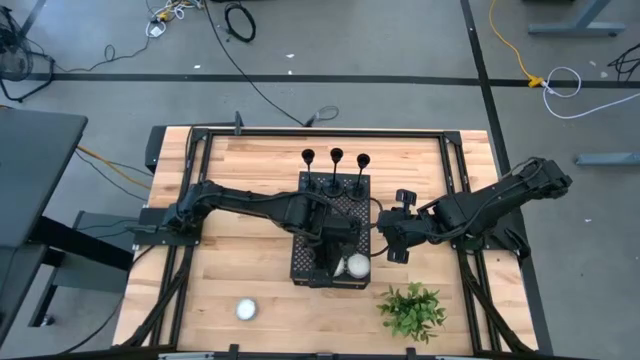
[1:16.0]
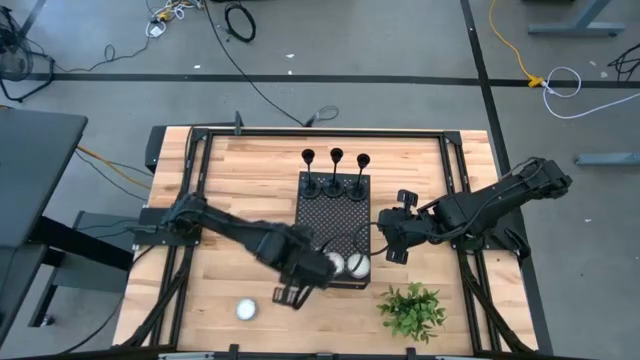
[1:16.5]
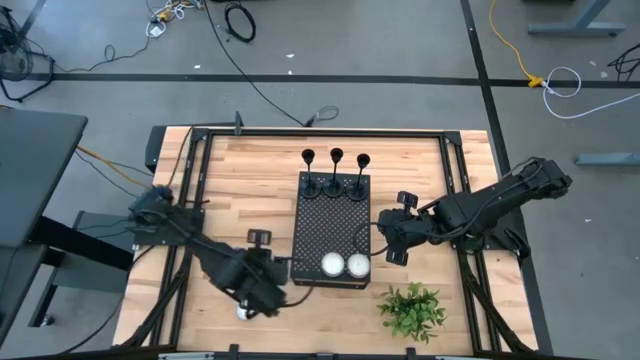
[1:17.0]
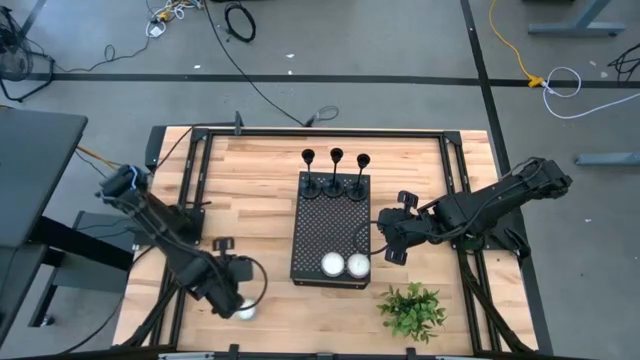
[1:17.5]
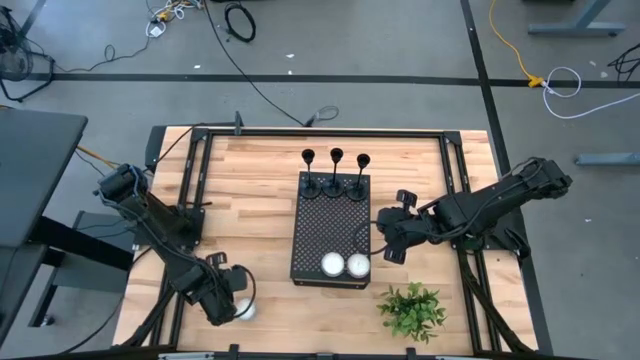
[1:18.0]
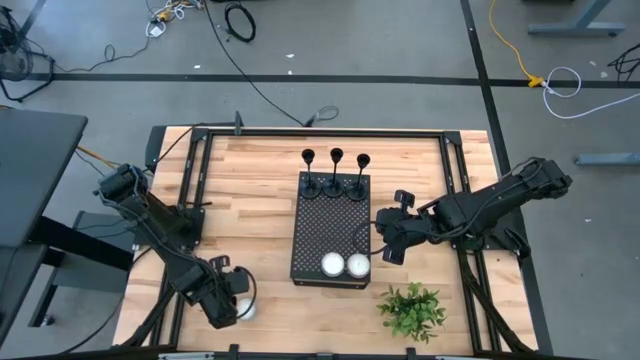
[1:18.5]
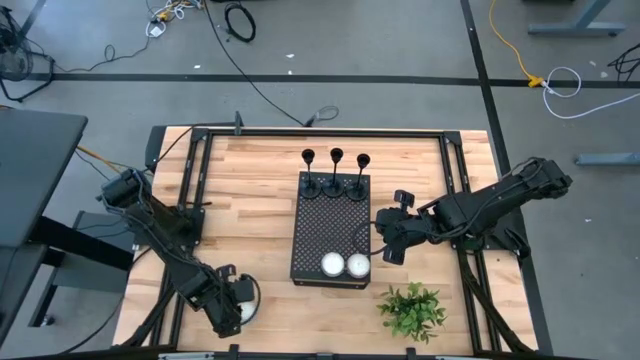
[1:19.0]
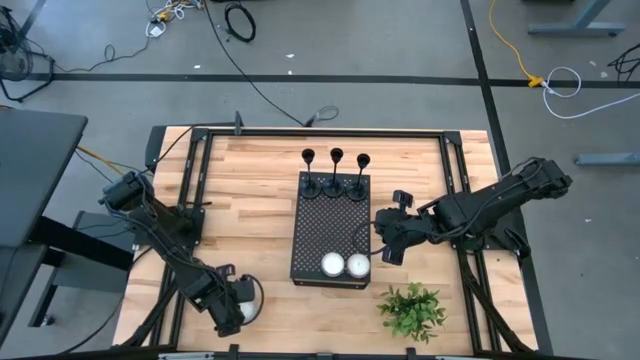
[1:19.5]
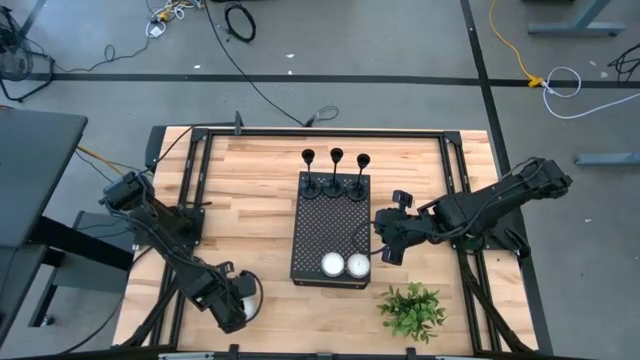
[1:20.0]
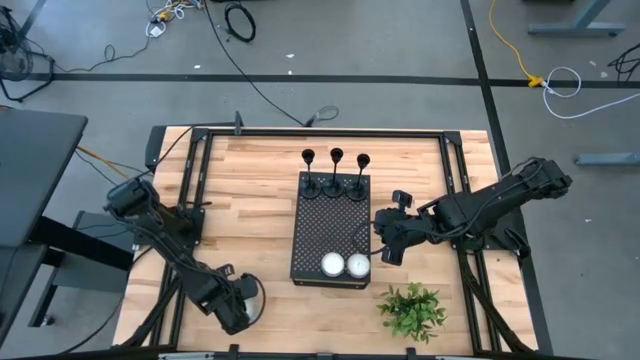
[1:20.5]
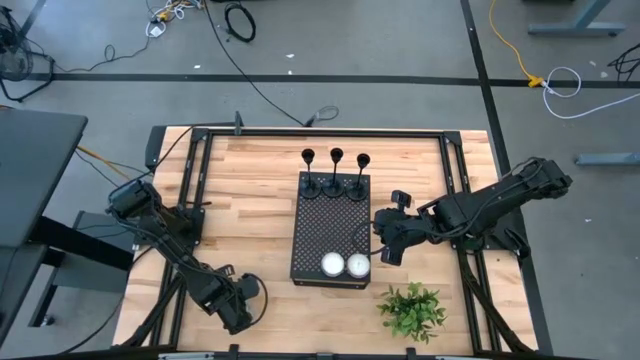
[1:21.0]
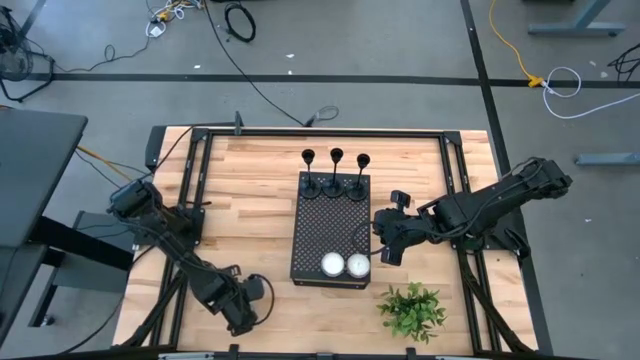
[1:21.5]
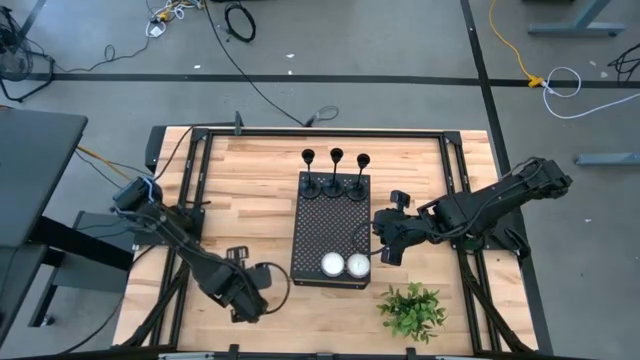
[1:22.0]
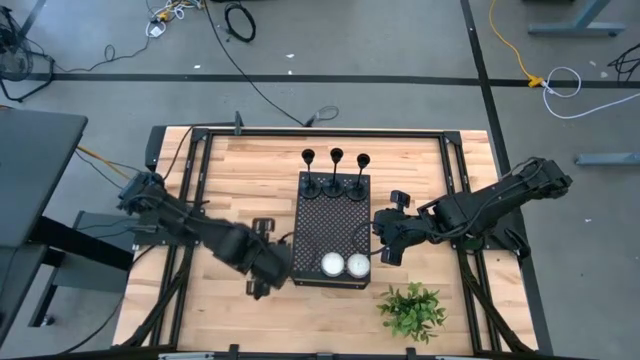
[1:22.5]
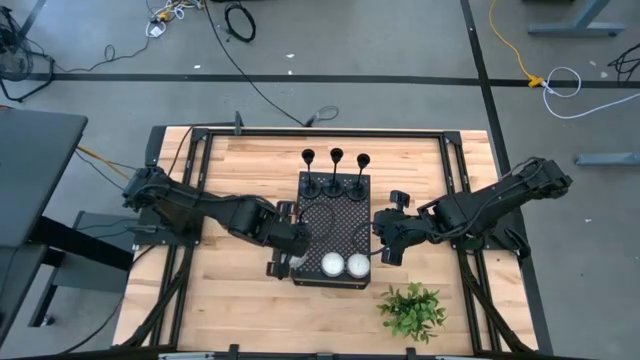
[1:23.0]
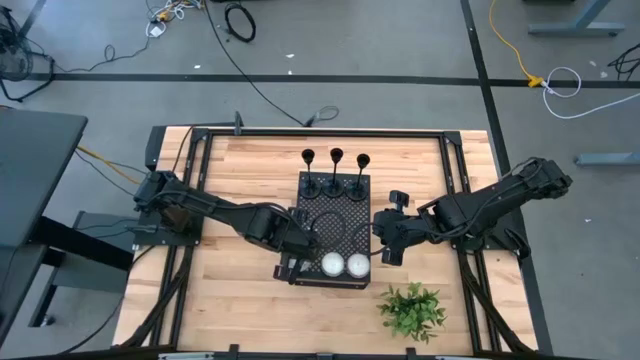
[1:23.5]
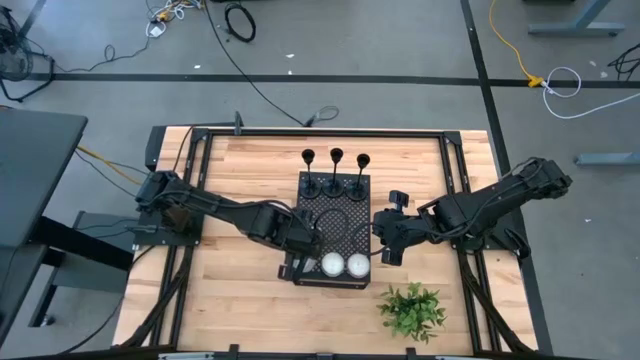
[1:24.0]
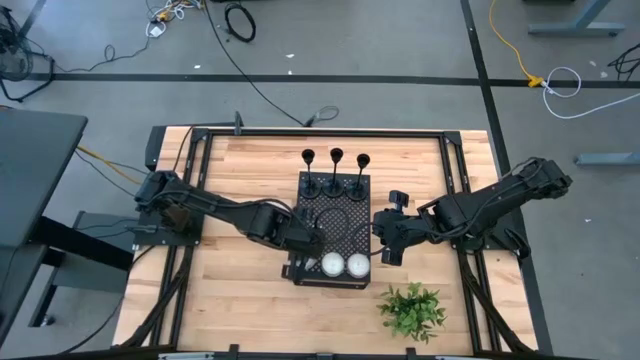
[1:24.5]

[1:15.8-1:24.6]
Task: Pick & Place candle stick holders
Put the brown scented candle on the shelf

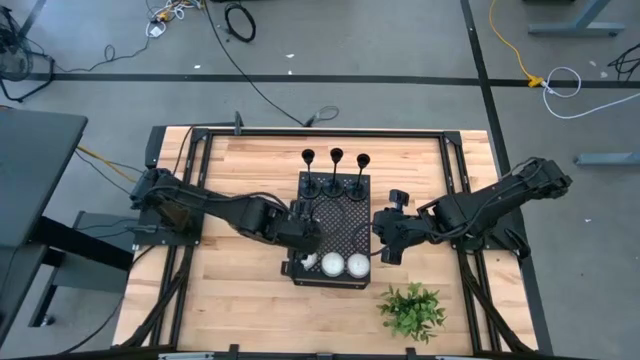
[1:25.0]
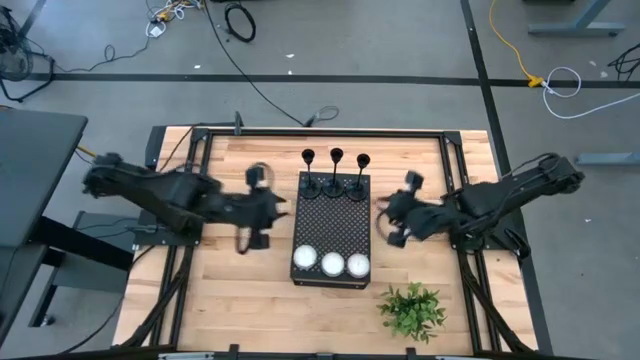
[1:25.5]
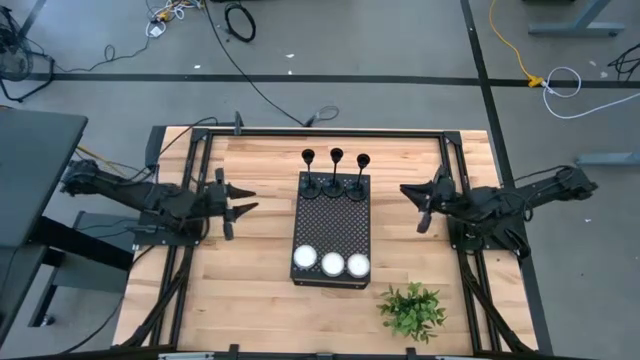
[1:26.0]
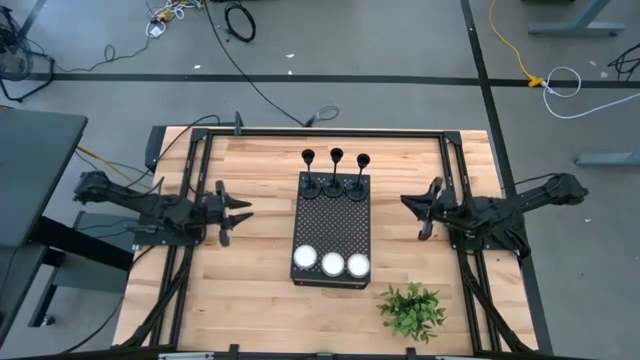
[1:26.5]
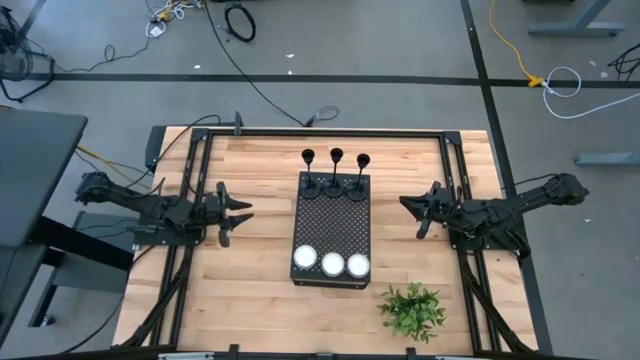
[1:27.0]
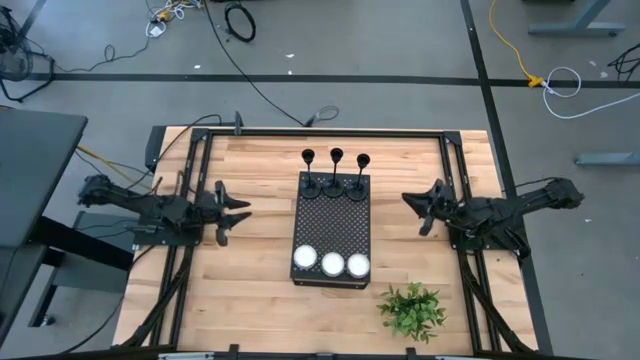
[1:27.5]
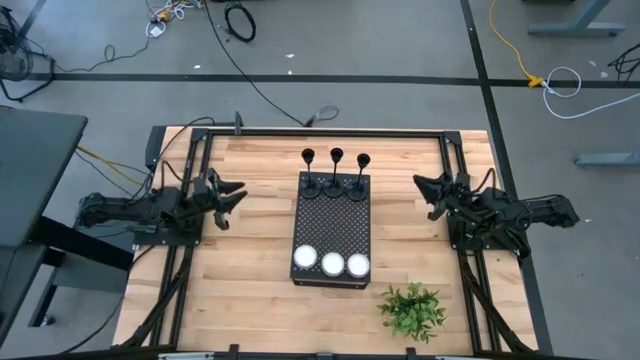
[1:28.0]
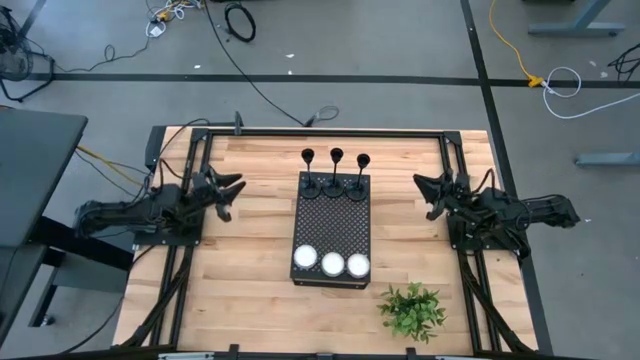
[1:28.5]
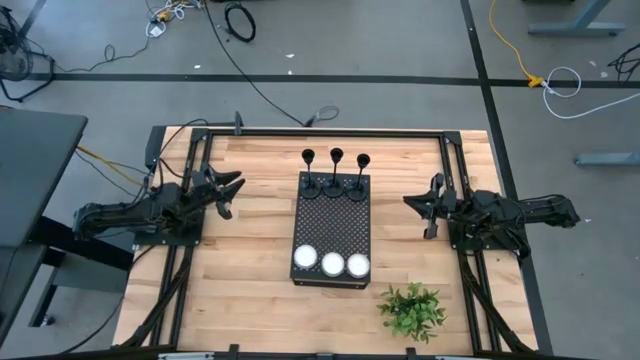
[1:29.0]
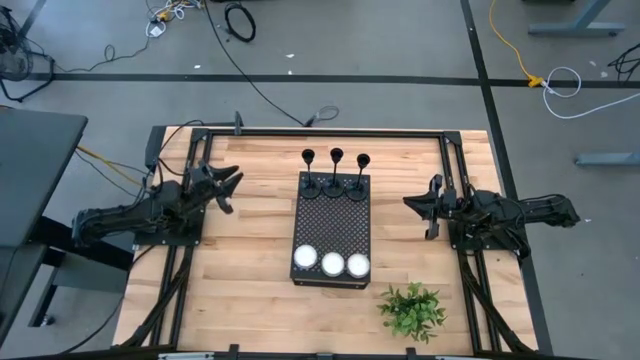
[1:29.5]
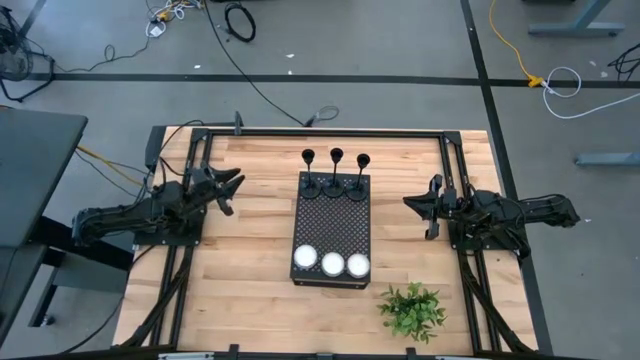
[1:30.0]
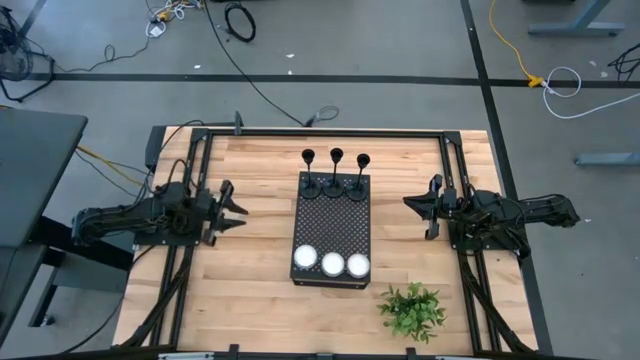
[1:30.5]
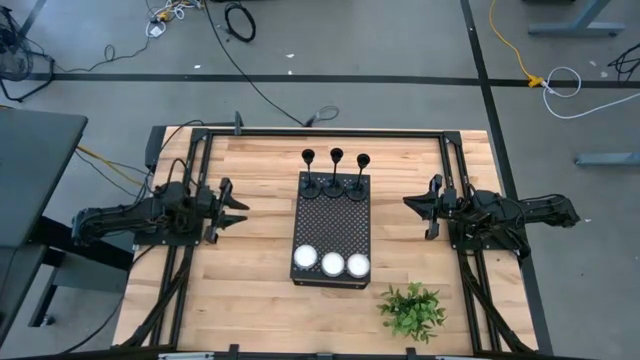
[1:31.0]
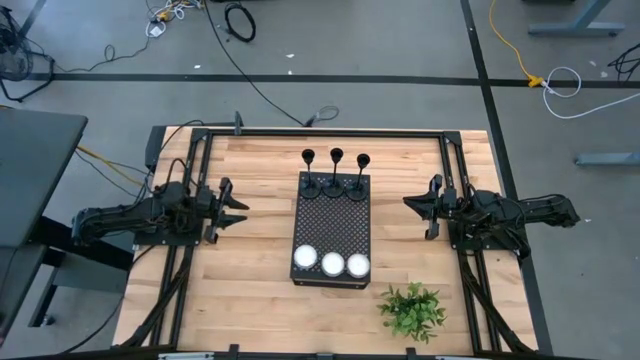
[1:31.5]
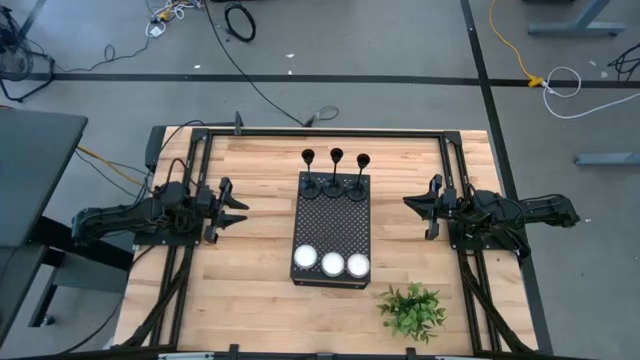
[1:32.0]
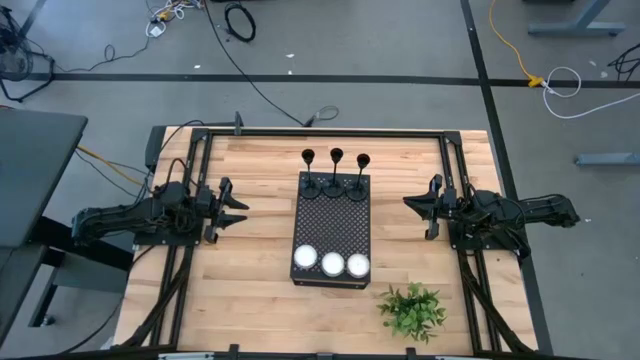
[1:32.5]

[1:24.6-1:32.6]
Return to Home Position

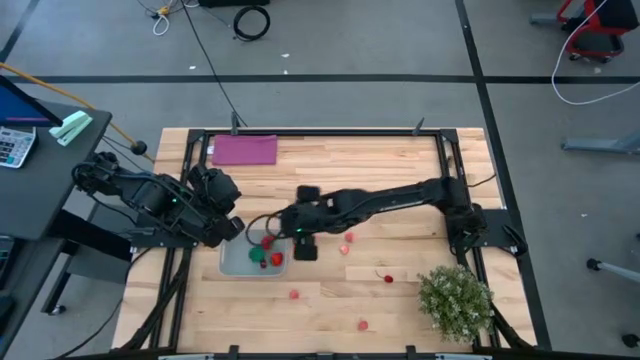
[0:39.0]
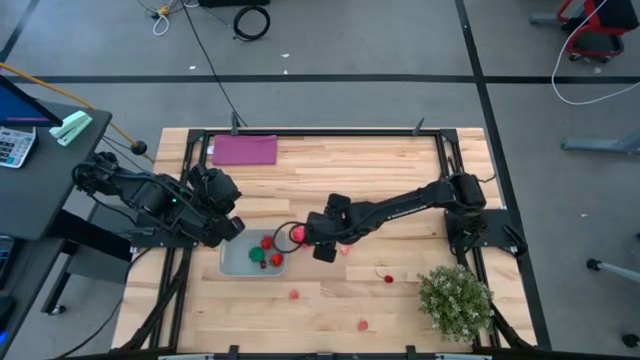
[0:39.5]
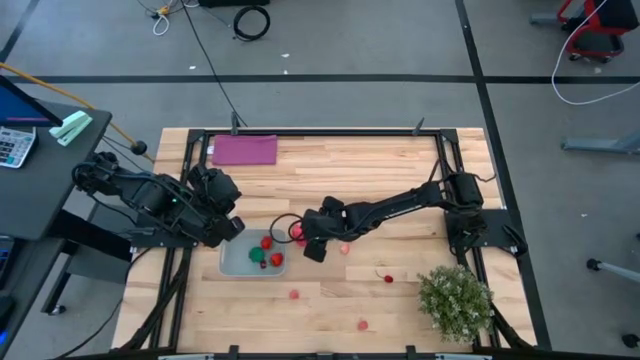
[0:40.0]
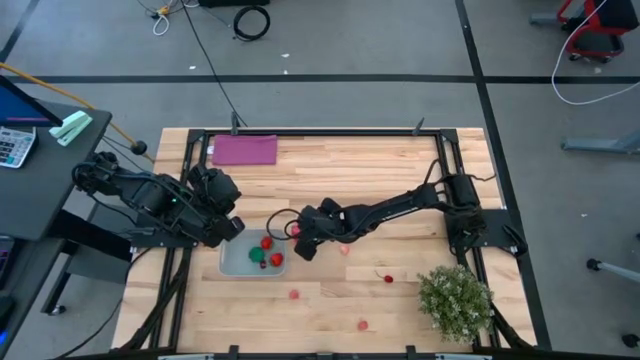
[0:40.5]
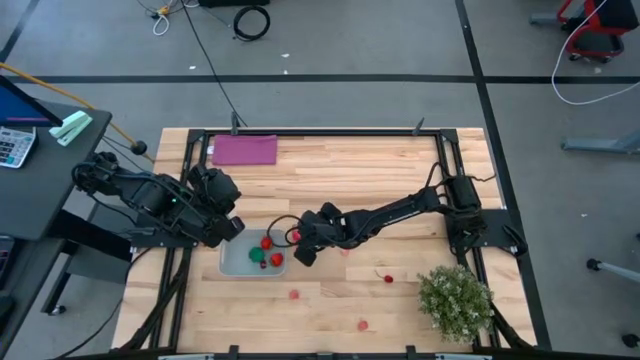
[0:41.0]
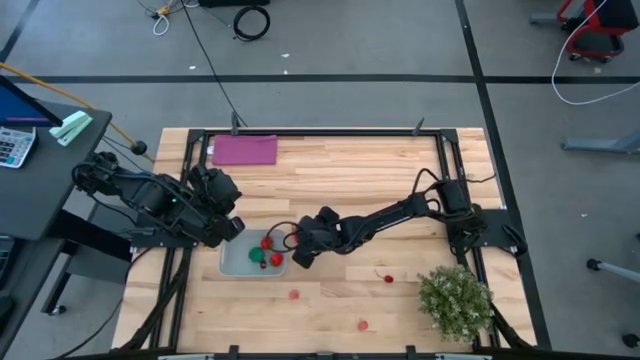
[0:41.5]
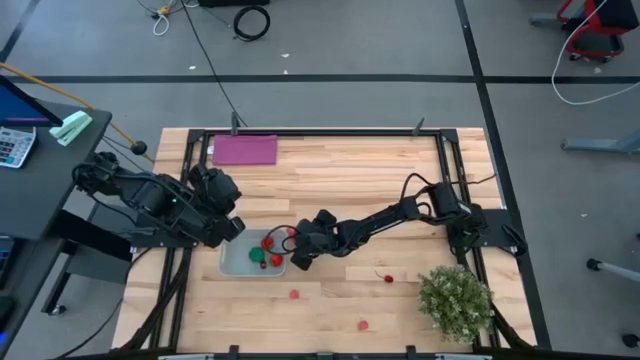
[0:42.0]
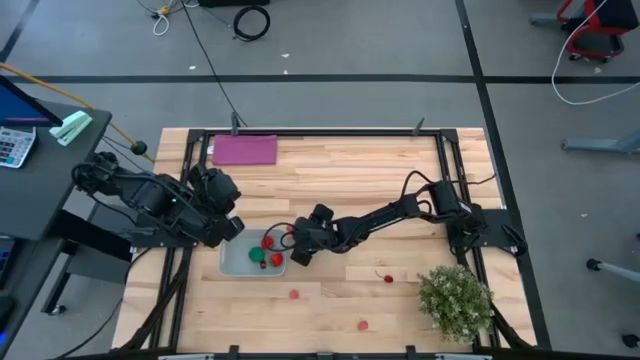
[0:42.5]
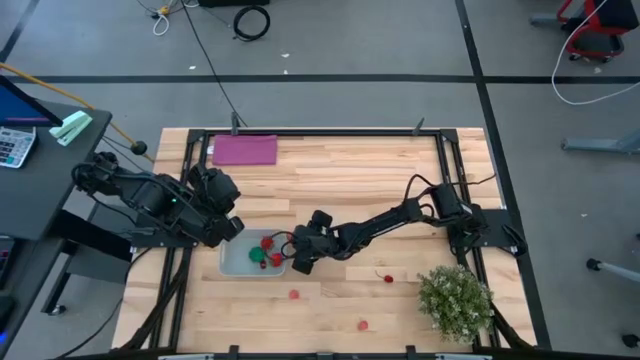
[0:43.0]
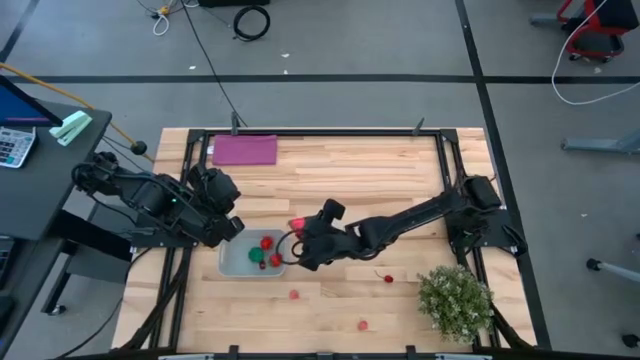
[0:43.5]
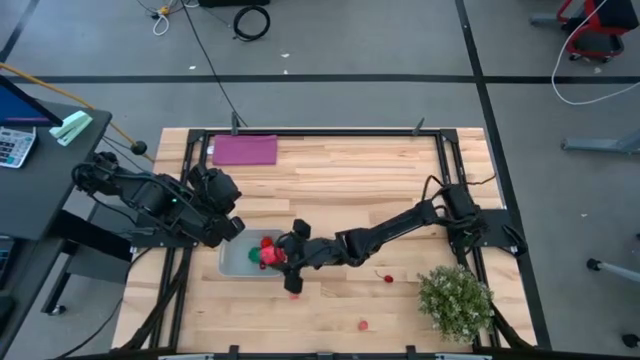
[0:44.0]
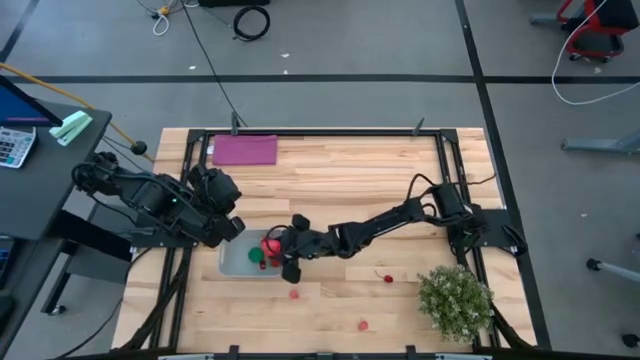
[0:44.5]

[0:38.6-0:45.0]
Task: Pick and placing Produce into tupperware
Put the pink dragon fruit into the gray container
